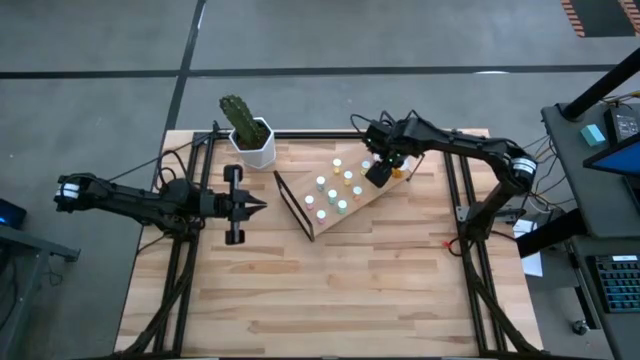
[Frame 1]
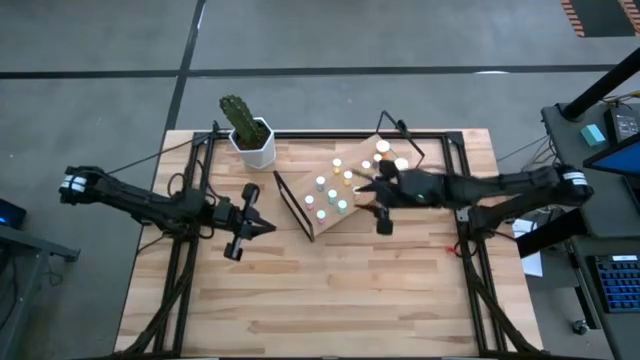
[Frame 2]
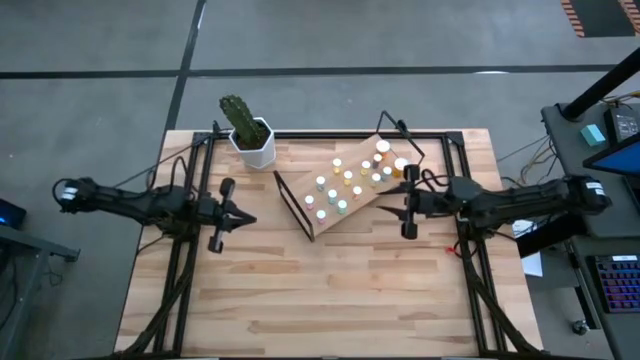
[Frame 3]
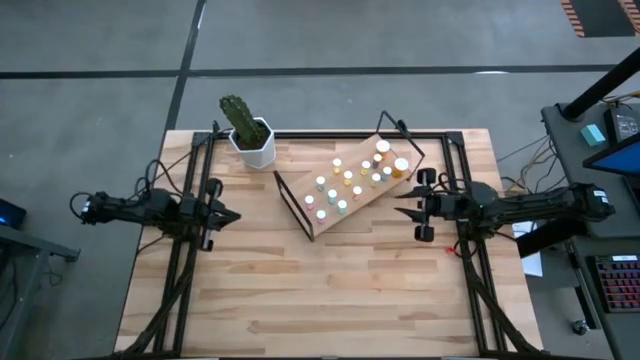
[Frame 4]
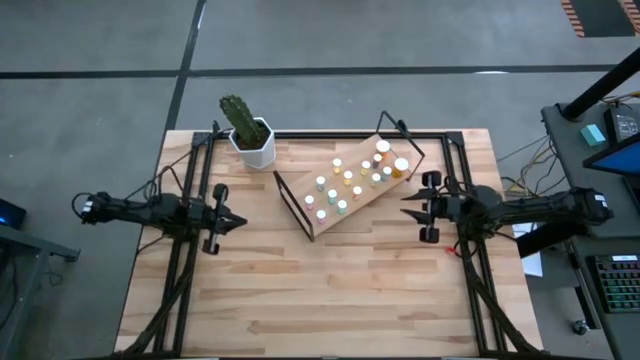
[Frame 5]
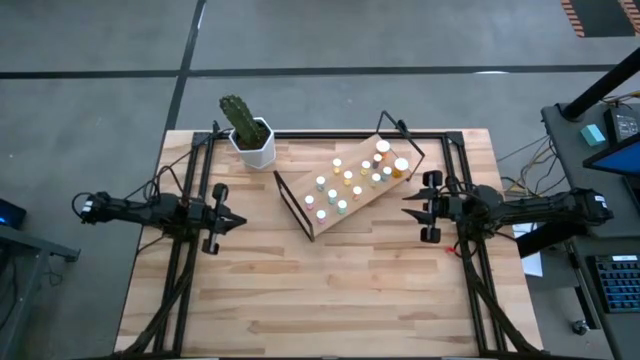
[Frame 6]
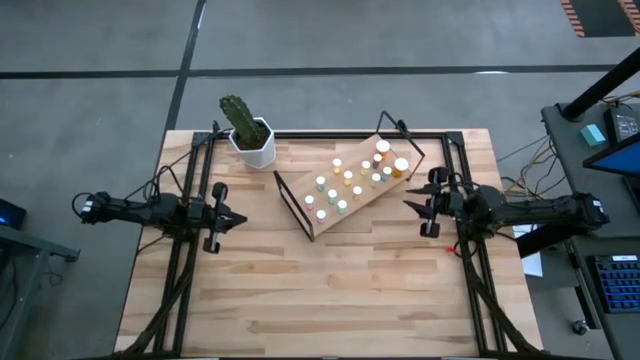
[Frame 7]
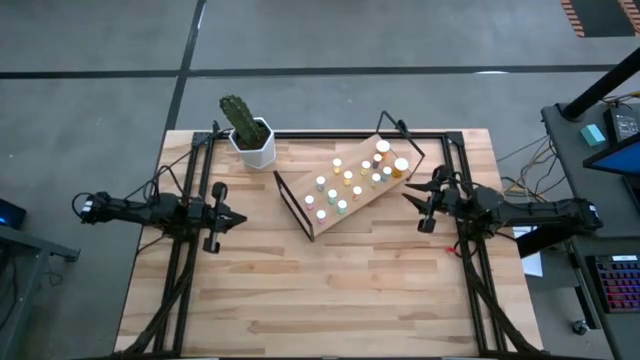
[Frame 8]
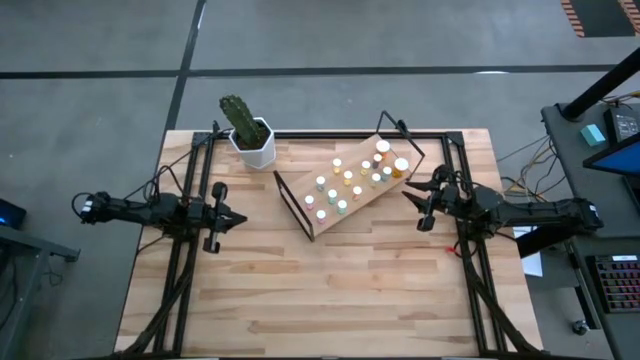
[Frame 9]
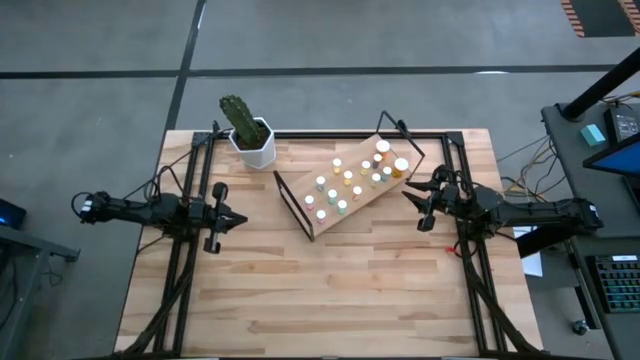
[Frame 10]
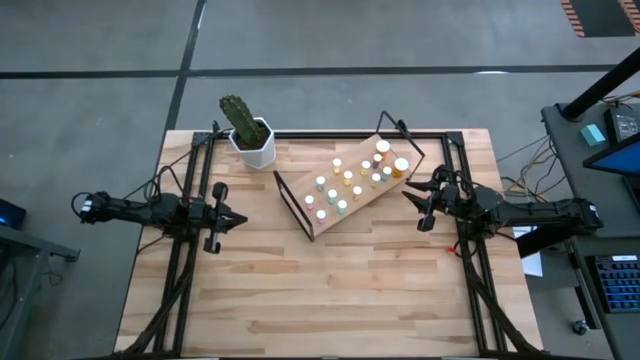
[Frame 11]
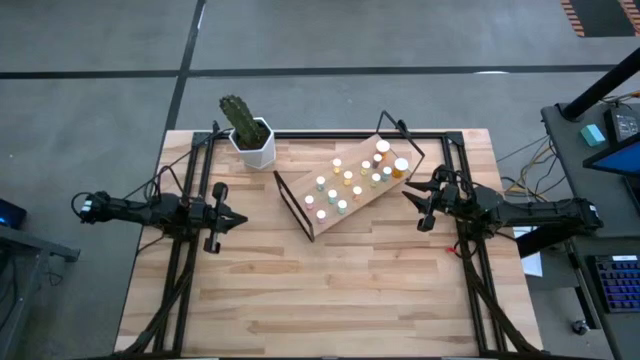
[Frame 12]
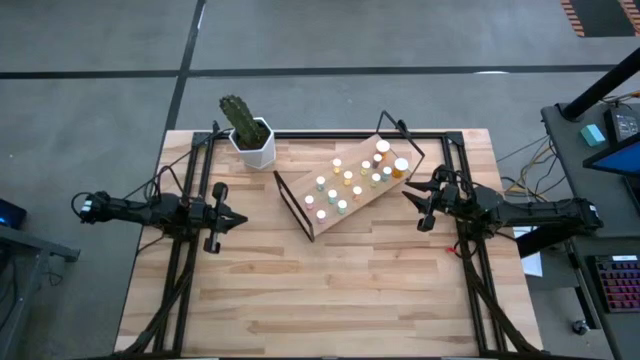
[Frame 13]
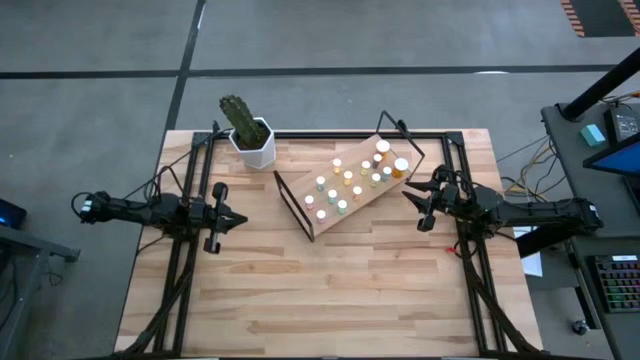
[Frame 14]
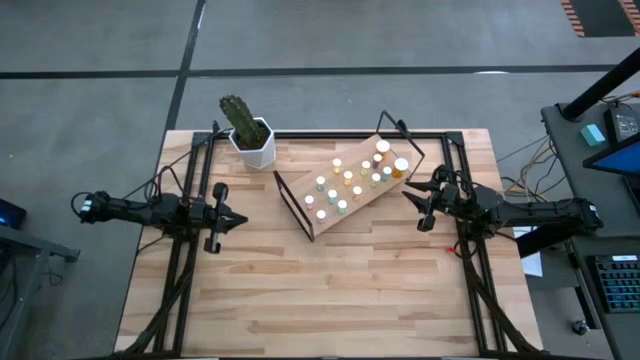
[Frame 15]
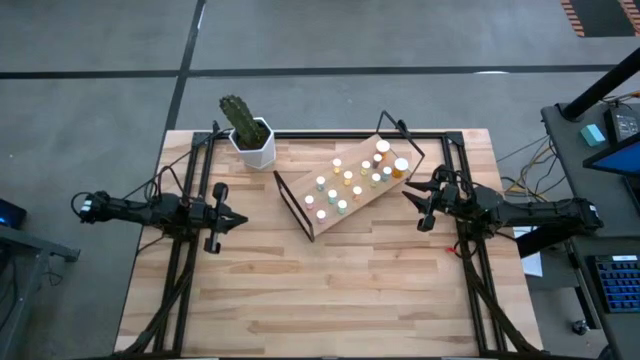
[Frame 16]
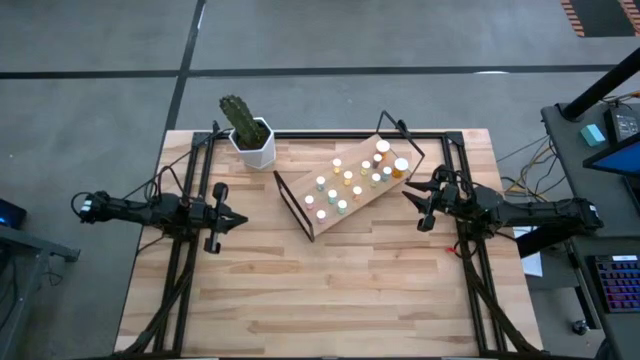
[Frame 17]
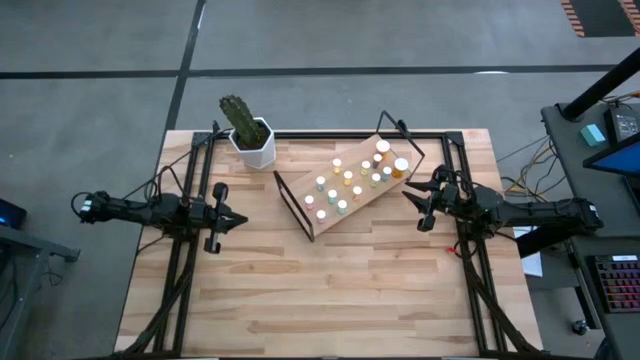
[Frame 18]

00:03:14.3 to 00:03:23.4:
Task: Pick and place medicine bottles onto shelf by color
Return to Home Position

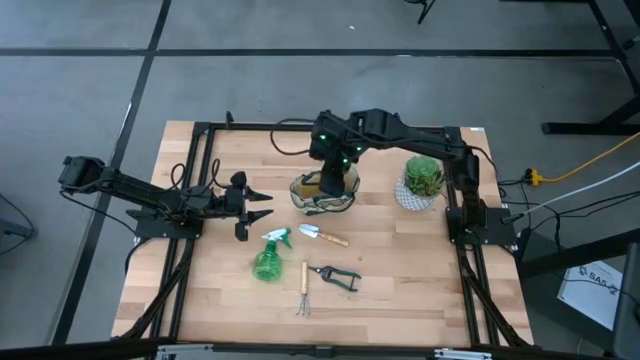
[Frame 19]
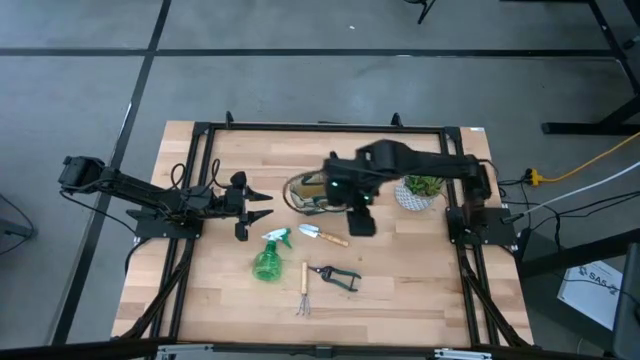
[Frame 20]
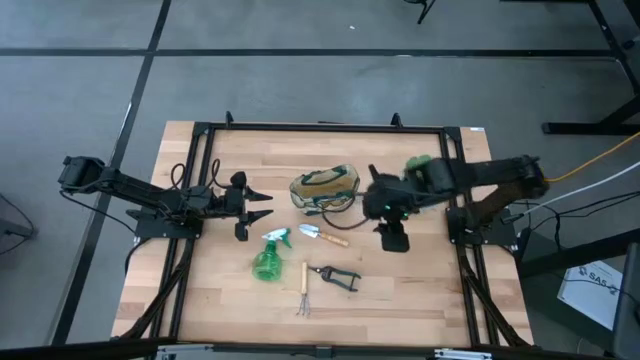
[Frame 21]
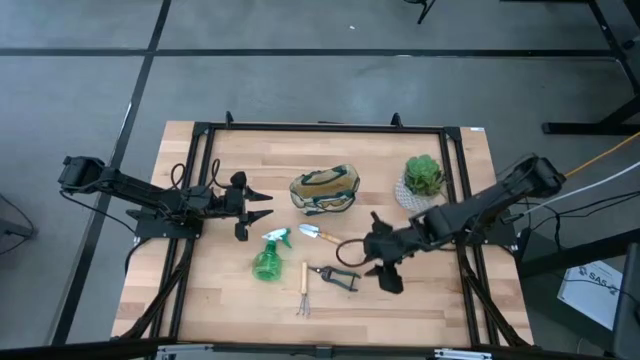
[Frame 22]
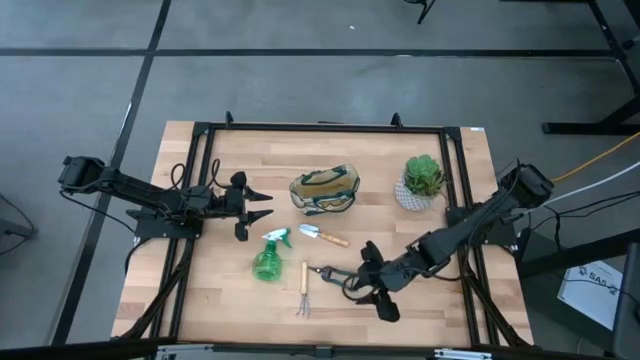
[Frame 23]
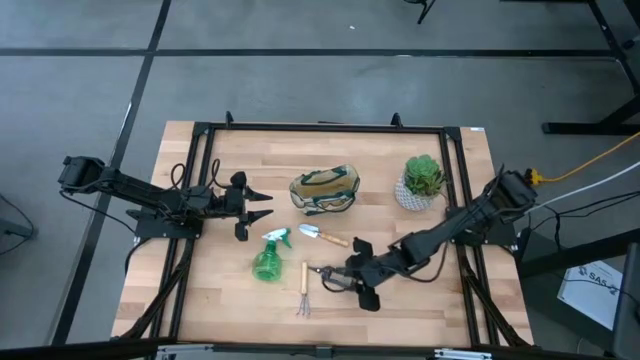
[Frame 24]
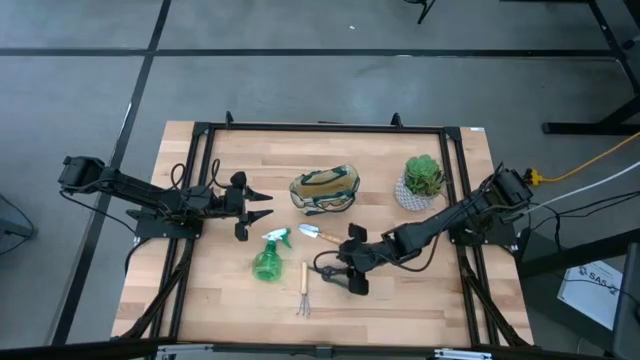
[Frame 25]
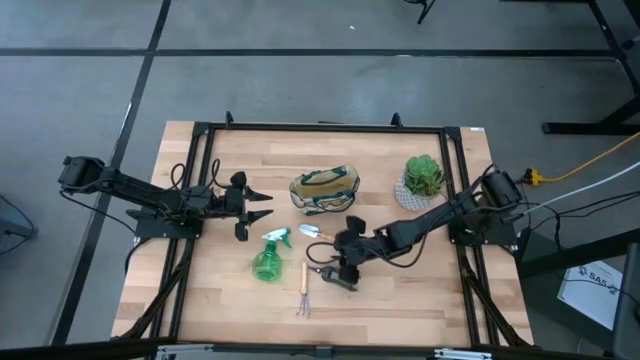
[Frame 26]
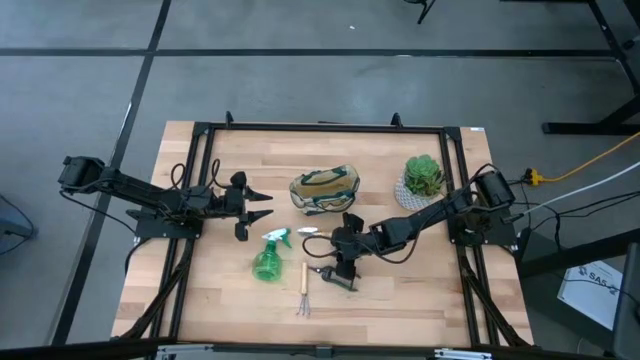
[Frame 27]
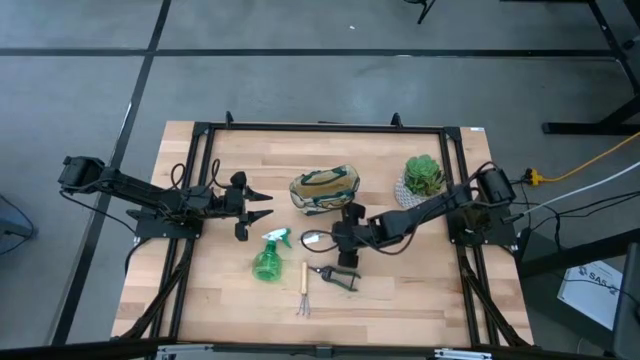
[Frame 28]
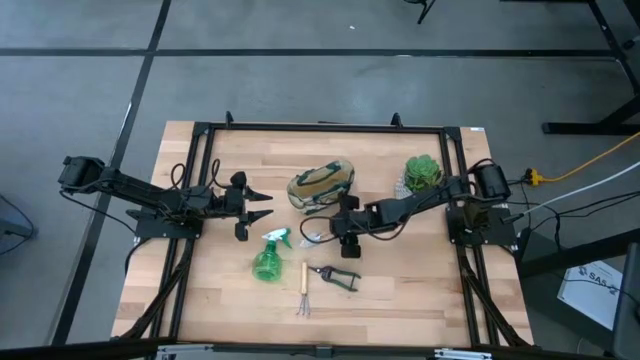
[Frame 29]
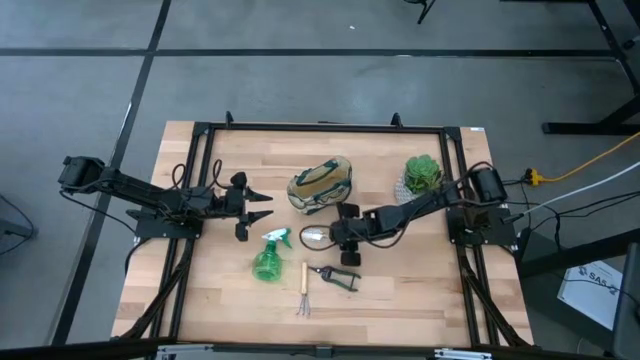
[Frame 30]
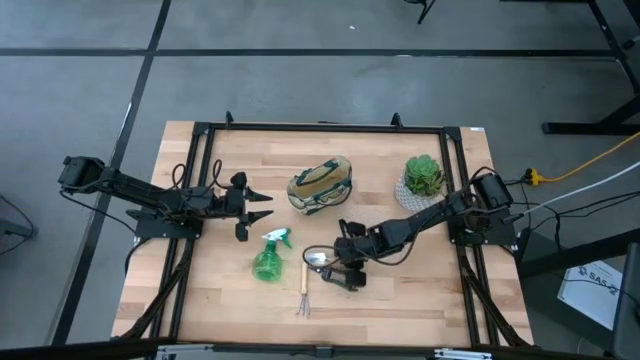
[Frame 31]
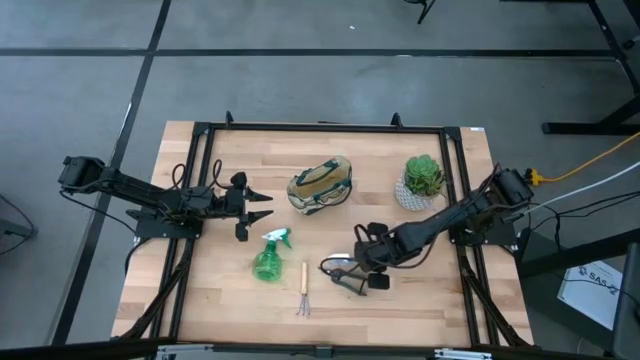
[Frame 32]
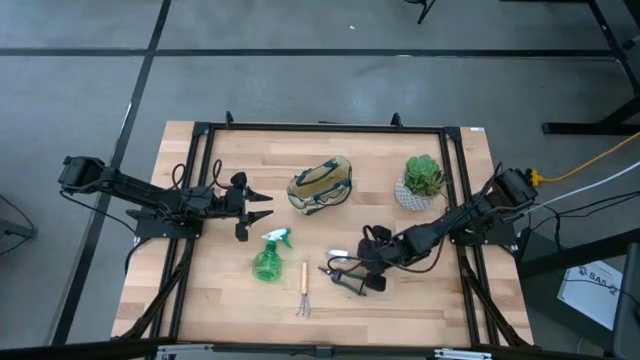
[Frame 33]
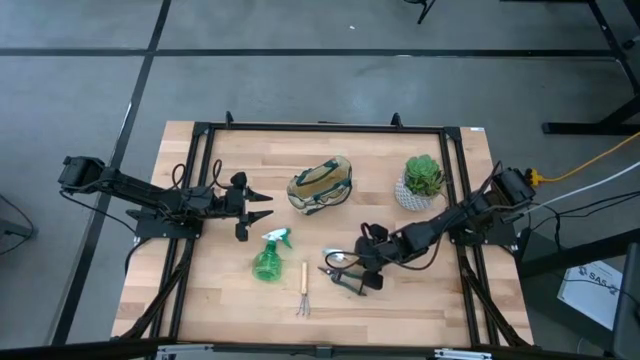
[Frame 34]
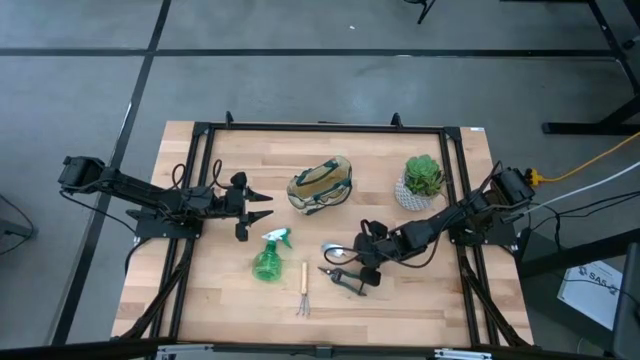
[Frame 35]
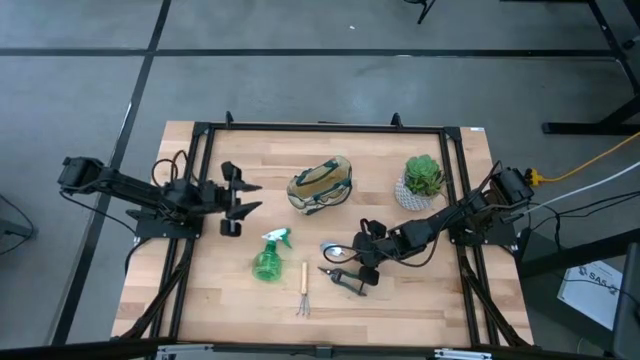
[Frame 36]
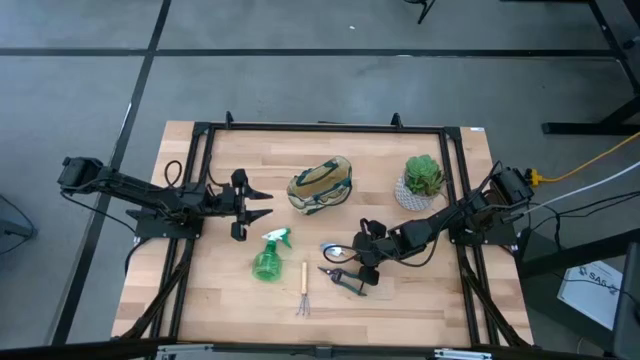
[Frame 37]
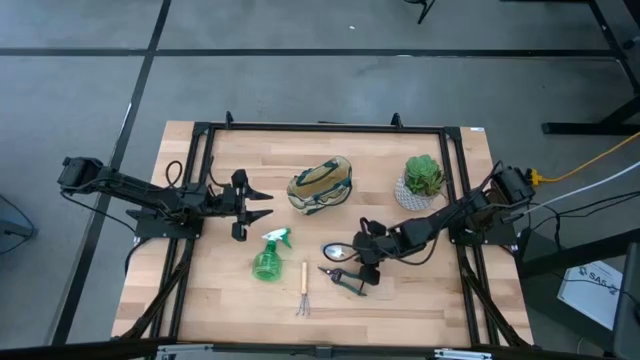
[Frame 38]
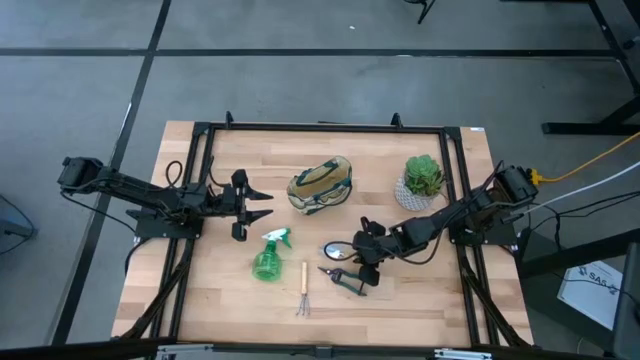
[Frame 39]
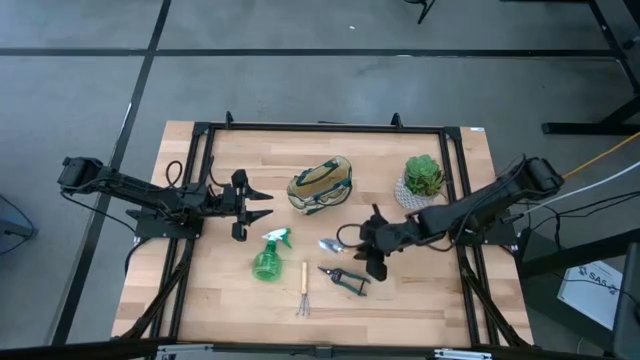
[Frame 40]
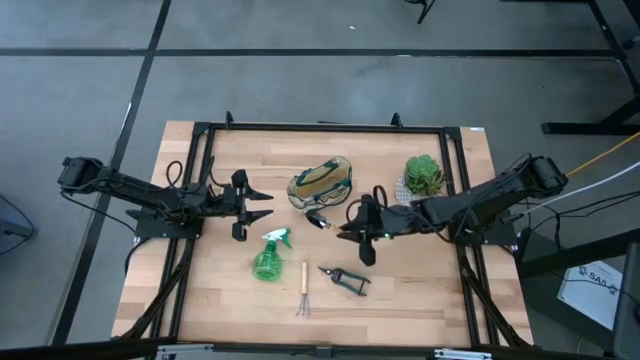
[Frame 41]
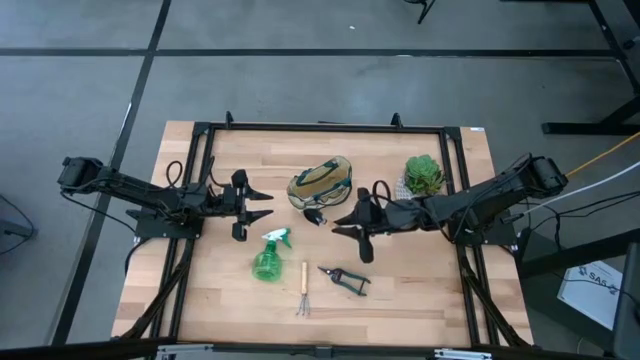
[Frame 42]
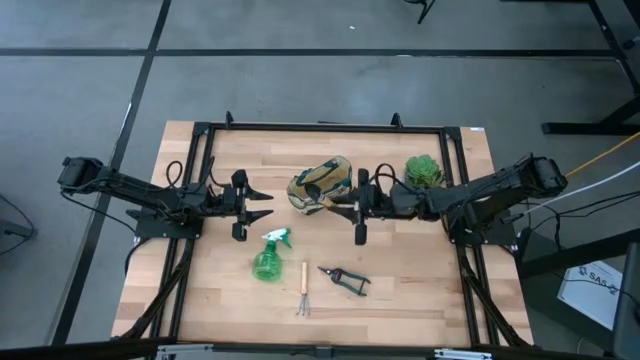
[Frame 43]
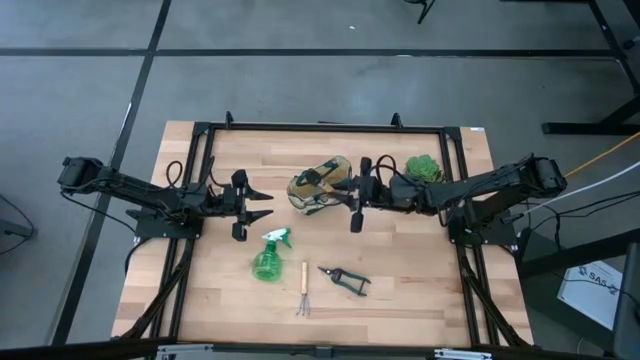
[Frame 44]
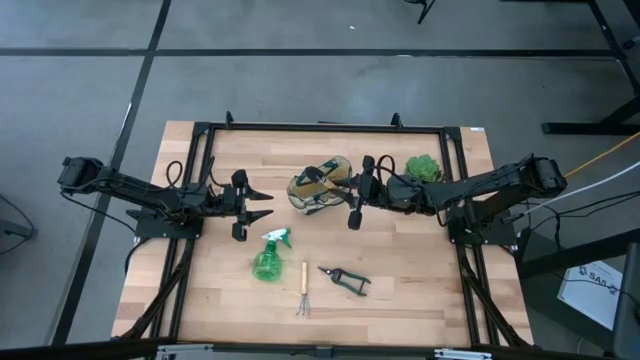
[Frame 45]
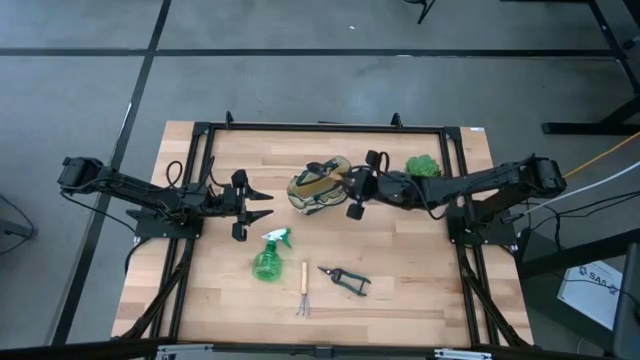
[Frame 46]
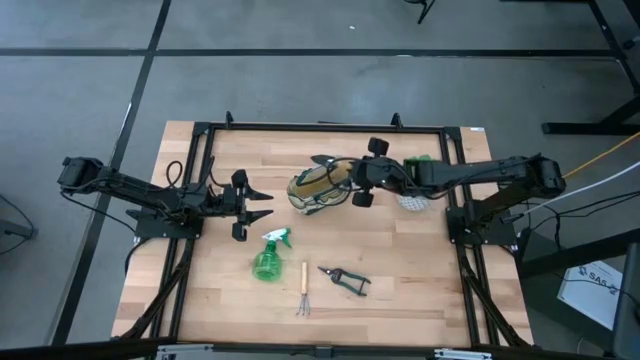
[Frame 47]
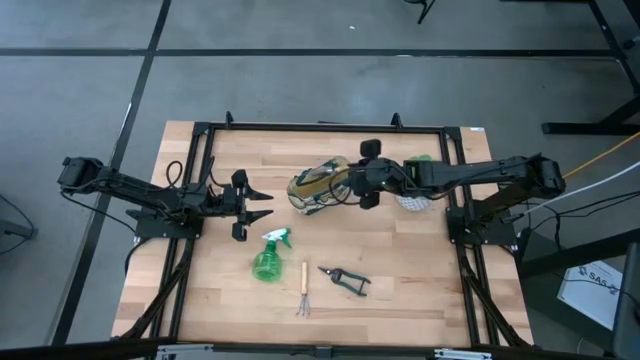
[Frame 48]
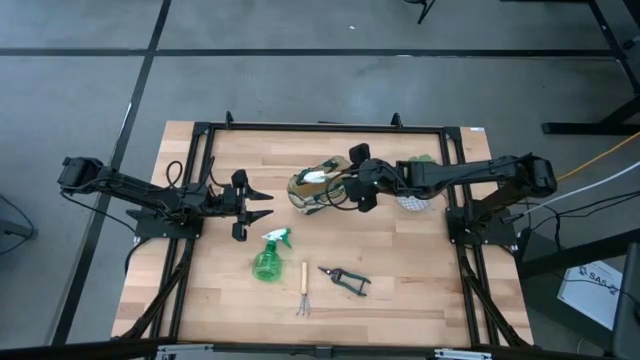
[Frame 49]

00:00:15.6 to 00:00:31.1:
Task: Pick & Place Garden tools in Gardening bag
Put the trowel into the gardening bag
